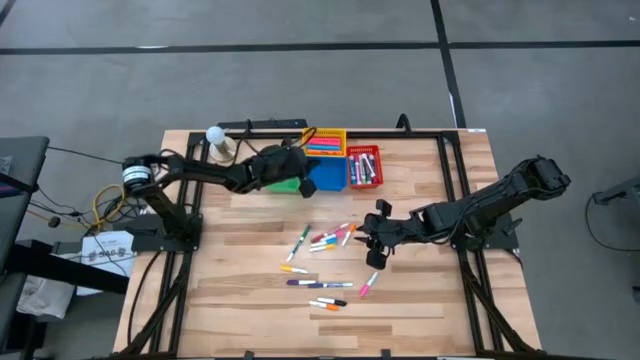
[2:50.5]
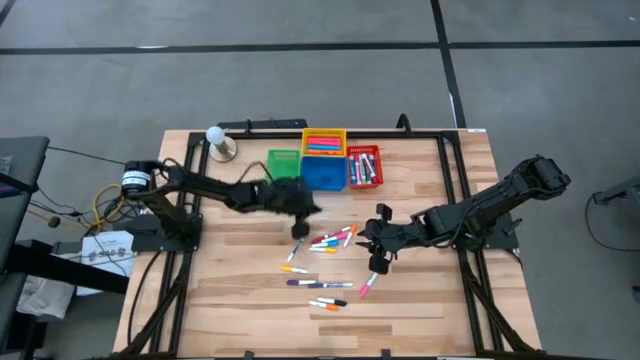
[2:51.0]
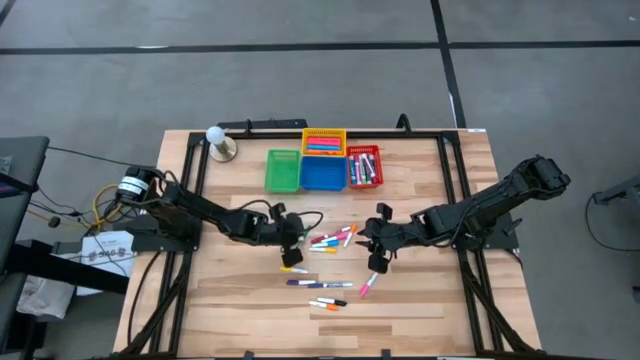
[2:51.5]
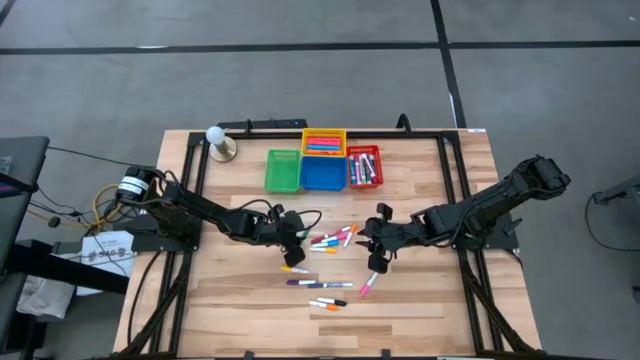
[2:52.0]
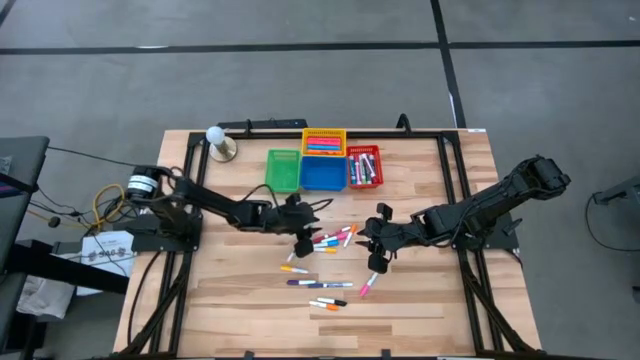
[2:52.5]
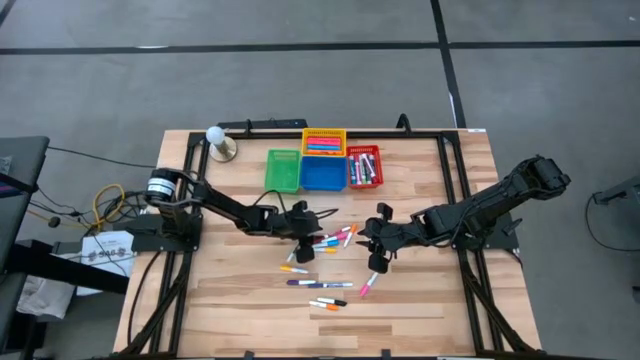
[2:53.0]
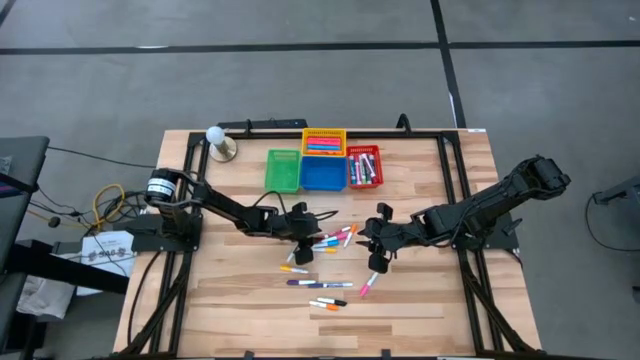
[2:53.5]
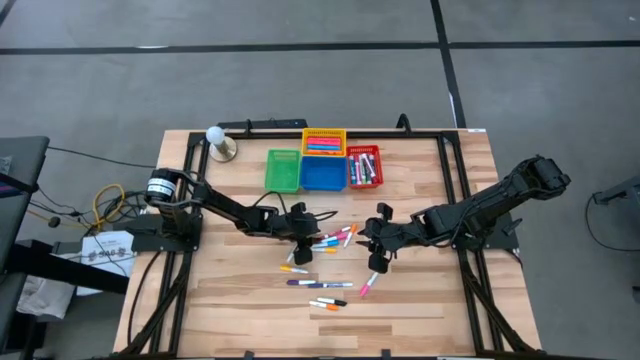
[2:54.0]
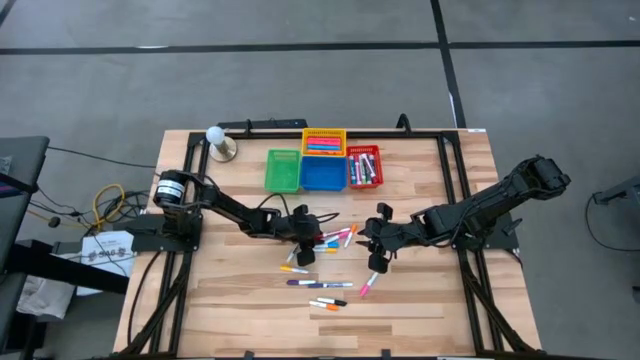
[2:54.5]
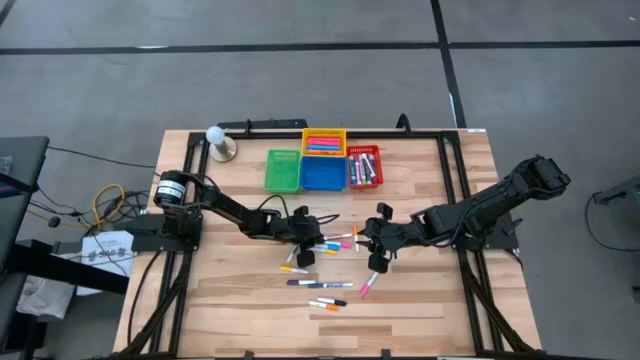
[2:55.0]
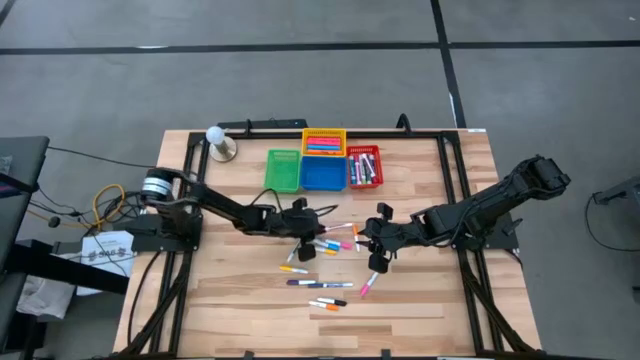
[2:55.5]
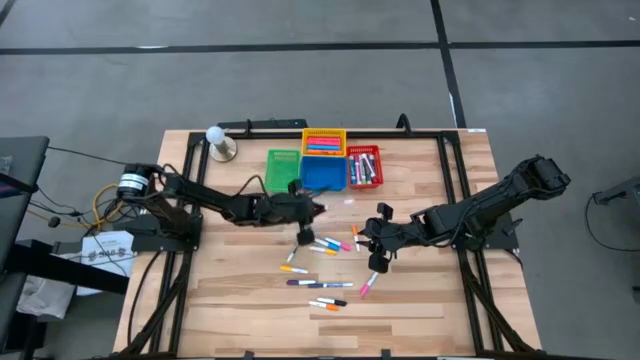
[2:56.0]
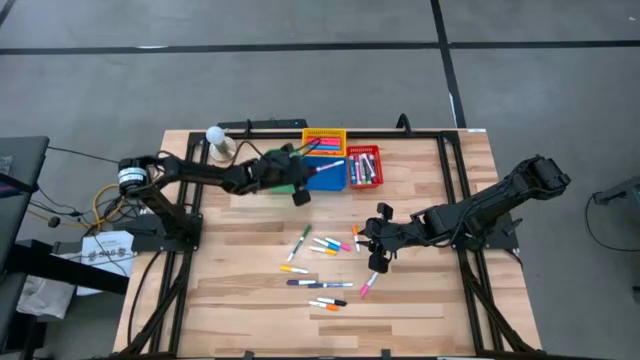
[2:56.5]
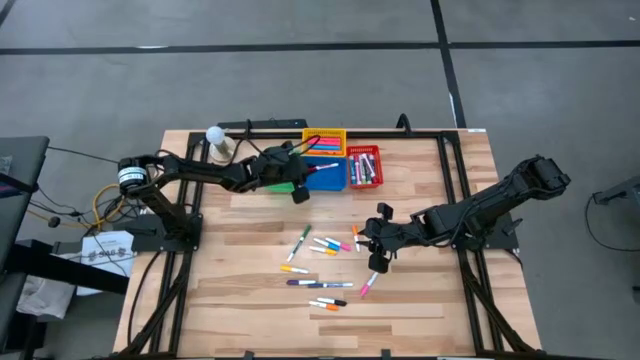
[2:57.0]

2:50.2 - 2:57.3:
Task: Pick & Place Markers
Put the small red marker pen into the blue bin

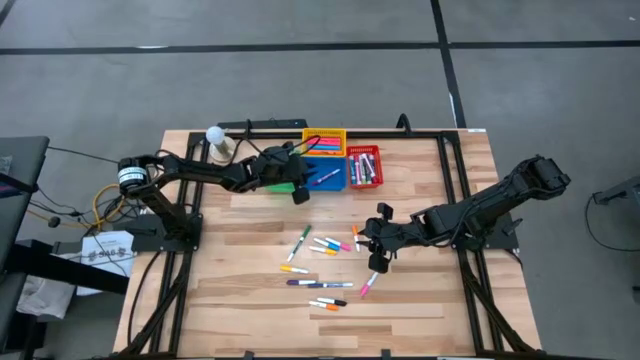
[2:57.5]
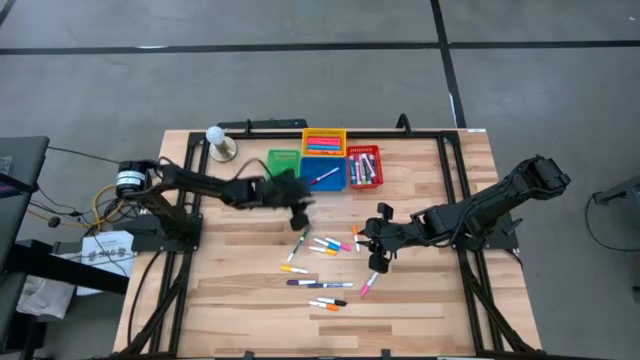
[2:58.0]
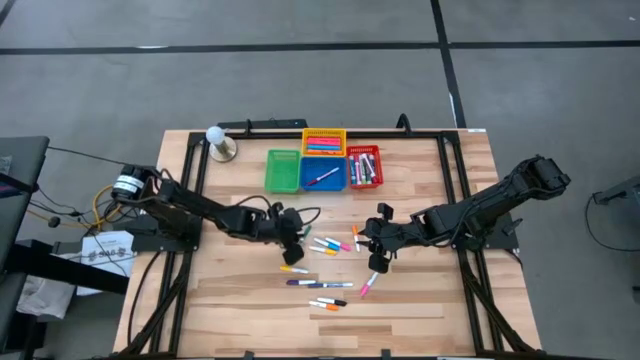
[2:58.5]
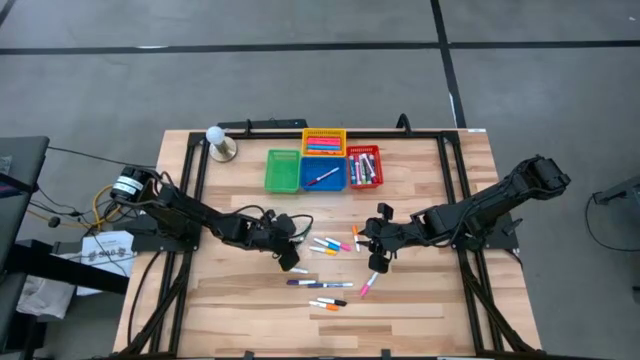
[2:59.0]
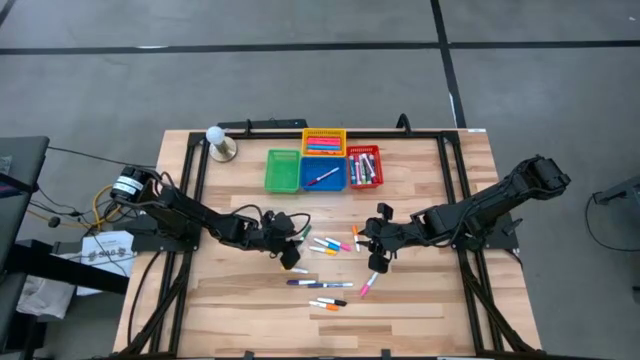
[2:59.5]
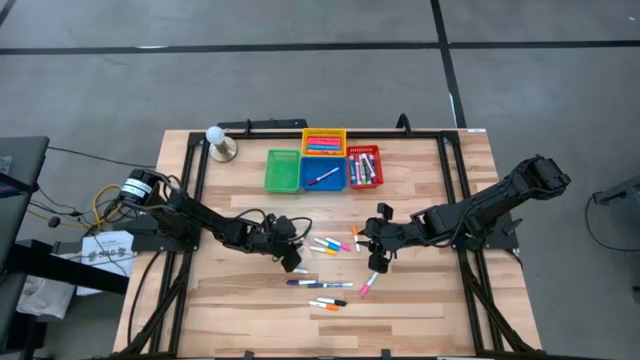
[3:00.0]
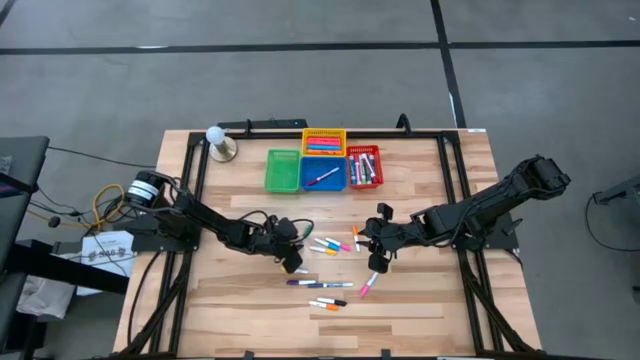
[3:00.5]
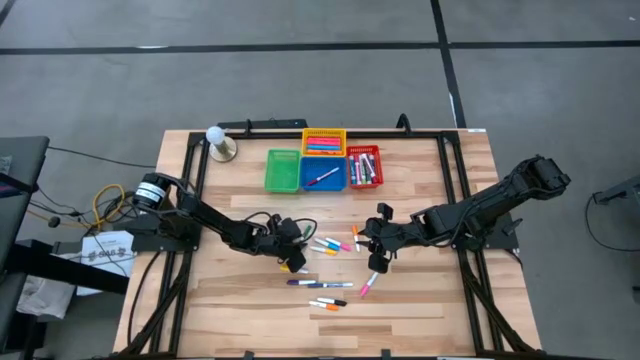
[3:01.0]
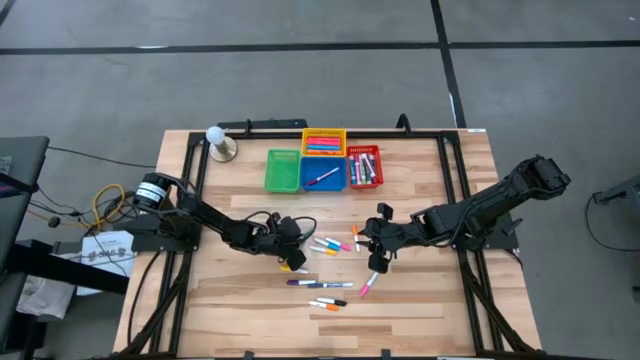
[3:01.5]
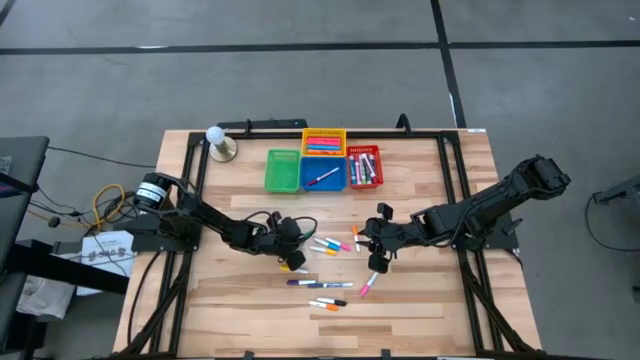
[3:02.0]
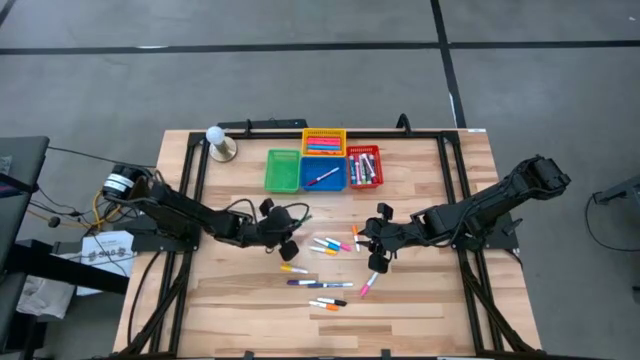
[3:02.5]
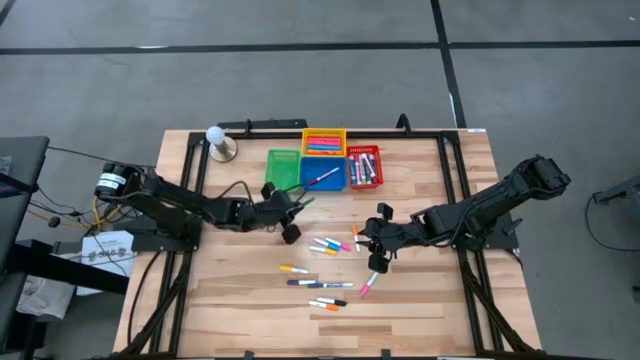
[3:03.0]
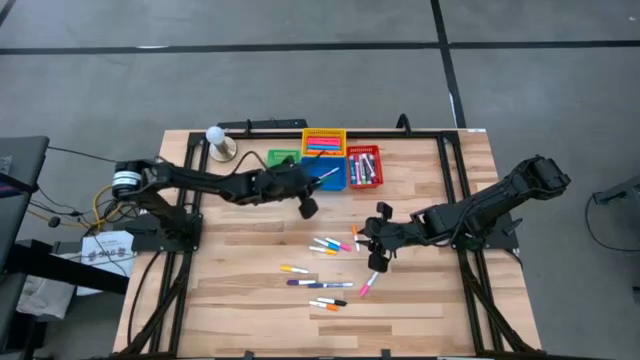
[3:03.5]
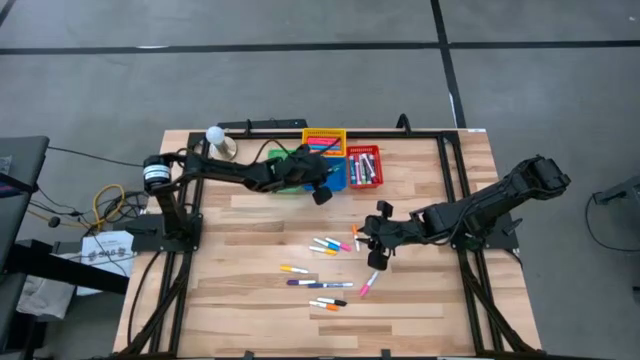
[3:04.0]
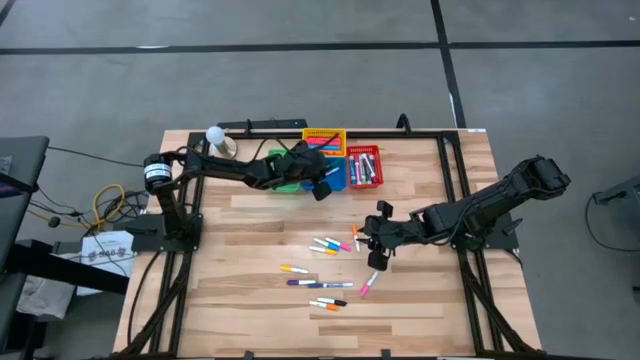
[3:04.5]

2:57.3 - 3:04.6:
Put the small green marker pen into the blue bin

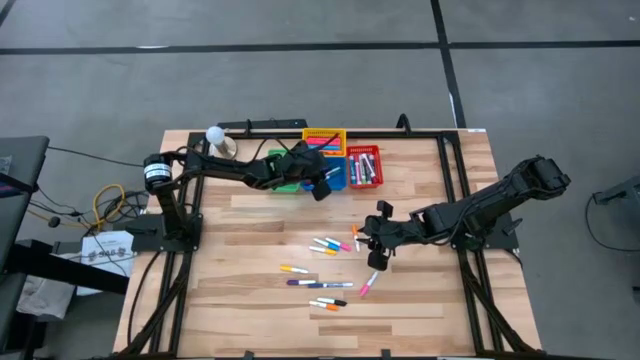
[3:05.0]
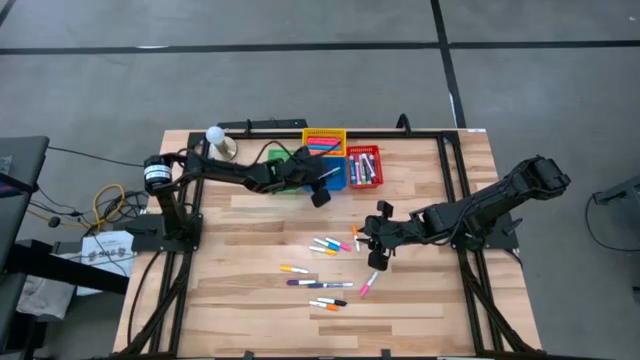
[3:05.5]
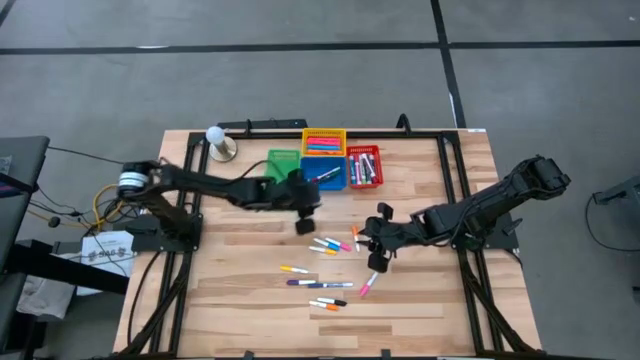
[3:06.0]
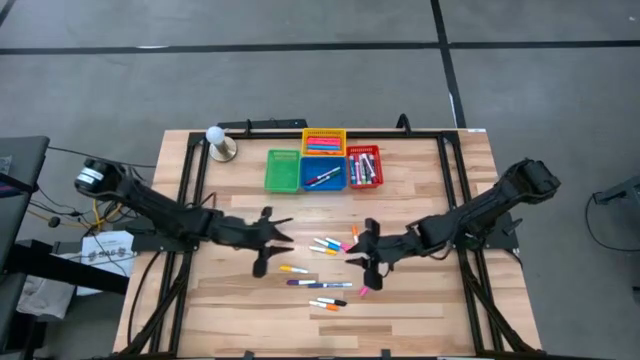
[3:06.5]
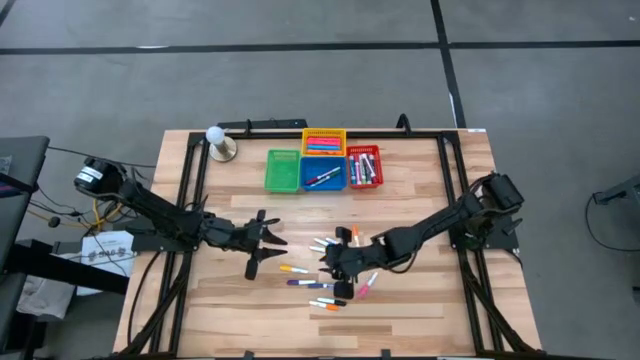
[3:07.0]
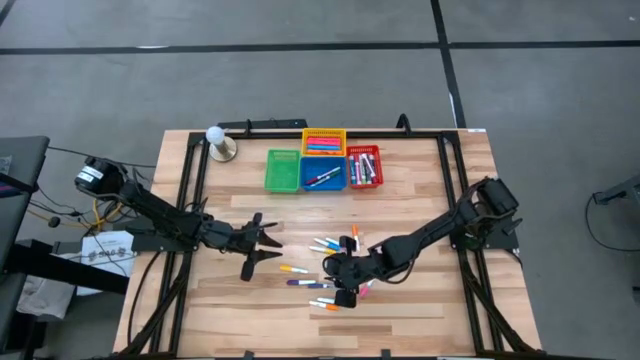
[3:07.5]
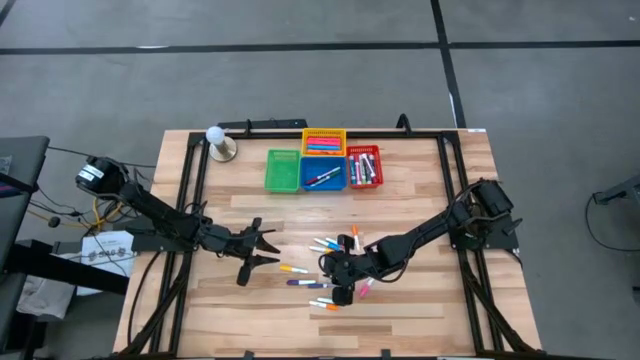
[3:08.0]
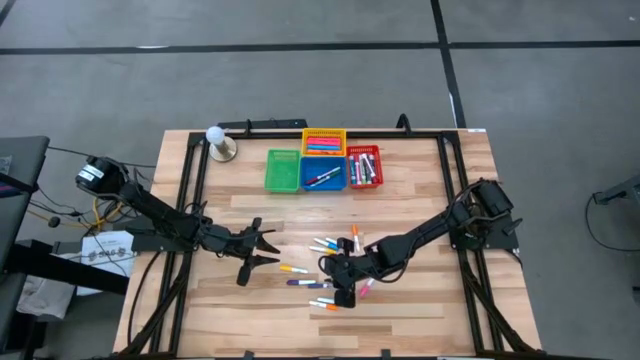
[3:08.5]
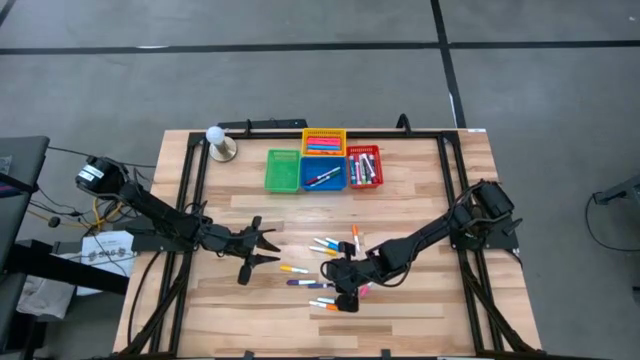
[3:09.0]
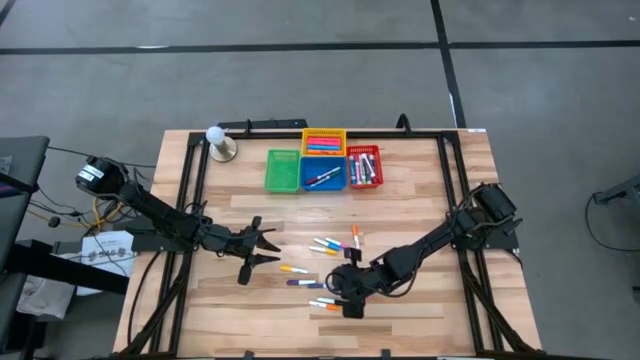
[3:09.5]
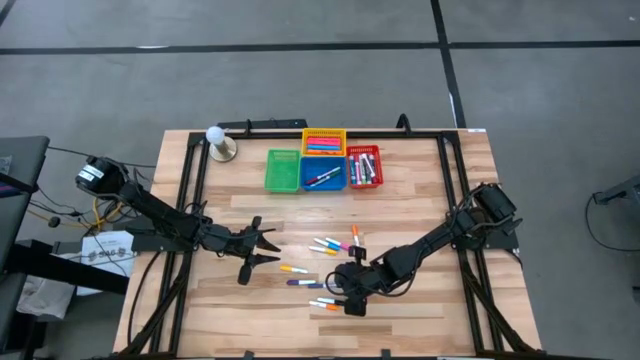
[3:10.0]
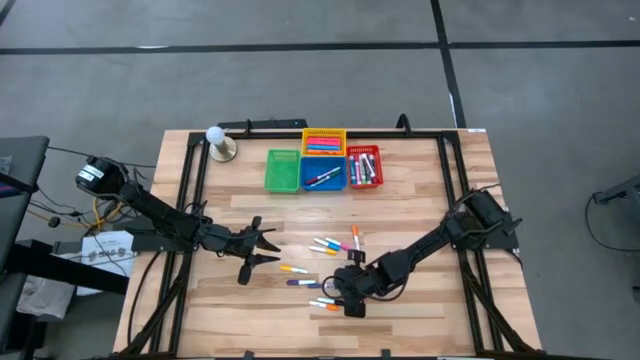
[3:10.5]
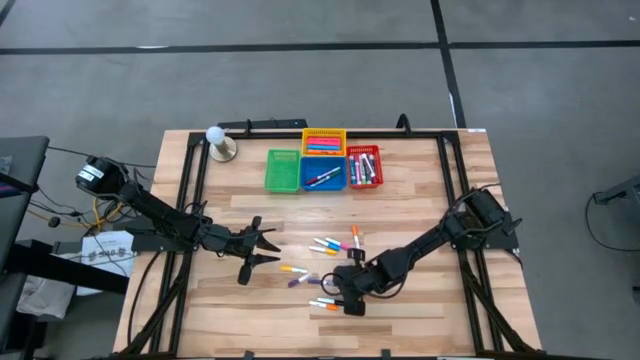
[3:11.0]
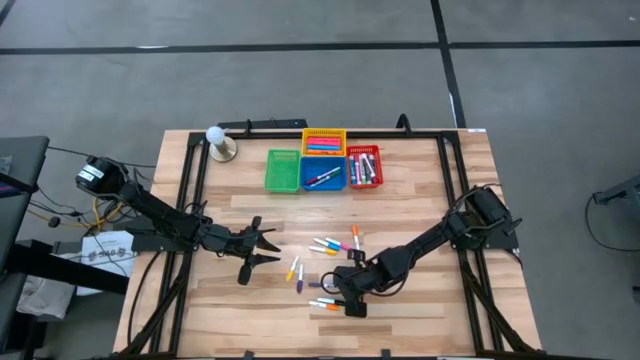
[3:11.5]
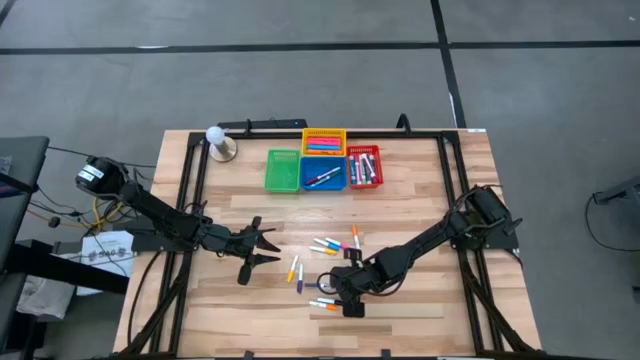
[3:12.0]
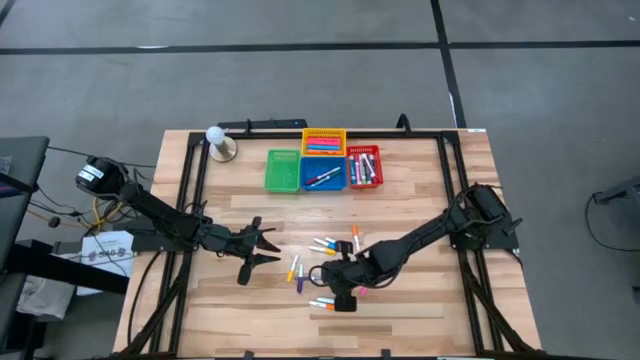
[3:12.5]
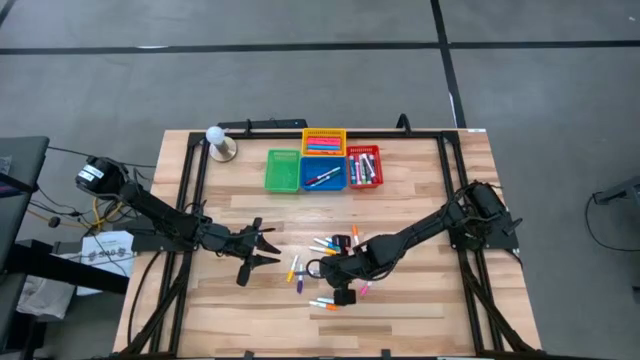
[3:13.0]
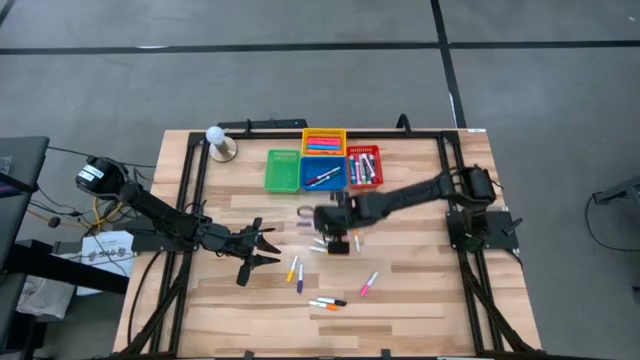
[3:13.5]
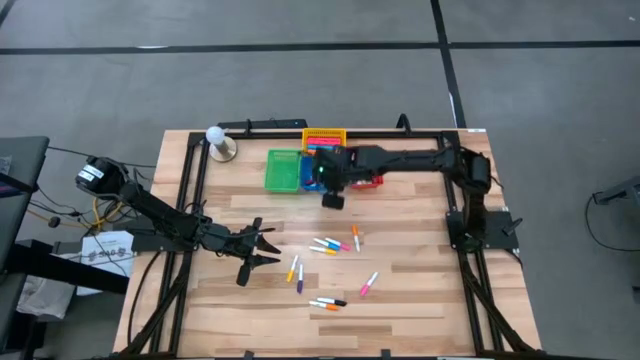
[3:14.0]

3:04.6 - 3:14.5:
Put the small blue marker pen into the blue bin
